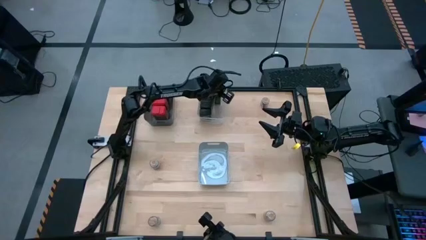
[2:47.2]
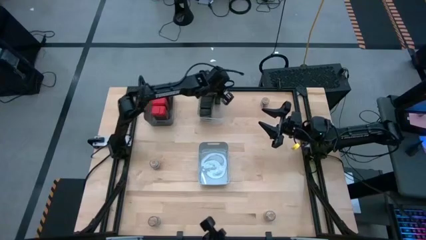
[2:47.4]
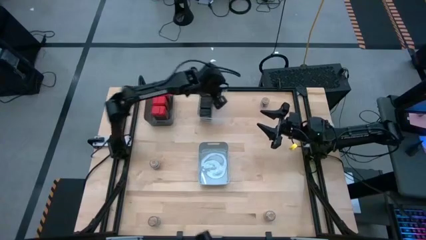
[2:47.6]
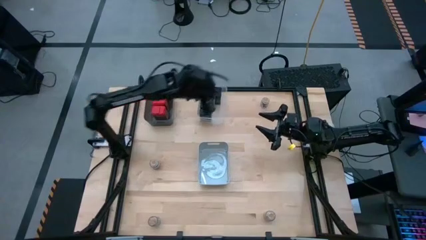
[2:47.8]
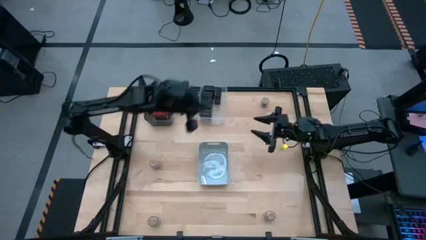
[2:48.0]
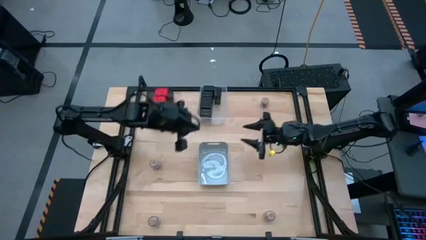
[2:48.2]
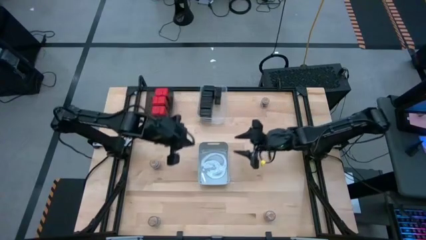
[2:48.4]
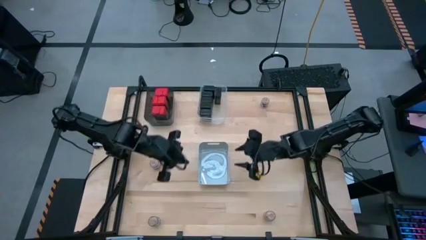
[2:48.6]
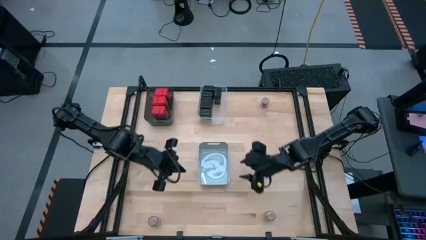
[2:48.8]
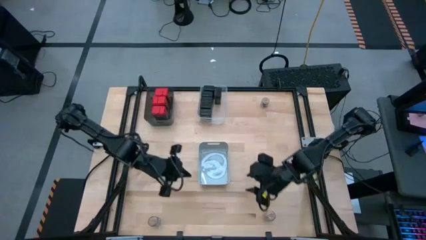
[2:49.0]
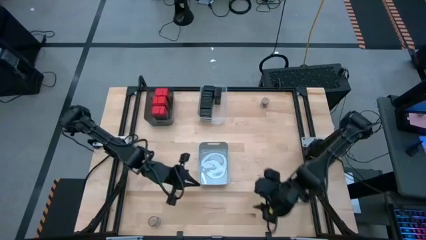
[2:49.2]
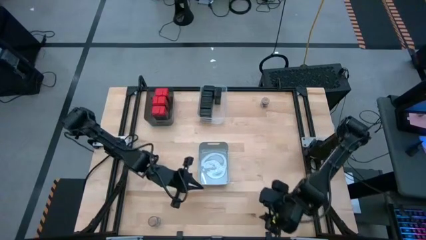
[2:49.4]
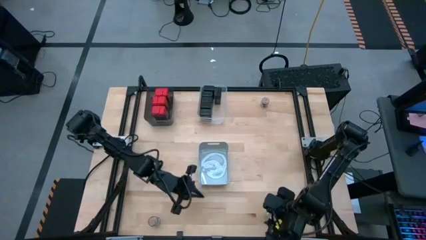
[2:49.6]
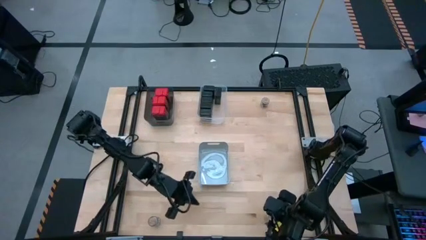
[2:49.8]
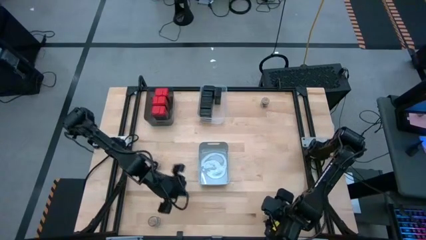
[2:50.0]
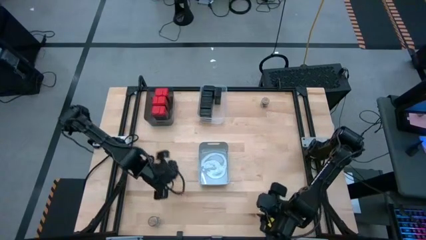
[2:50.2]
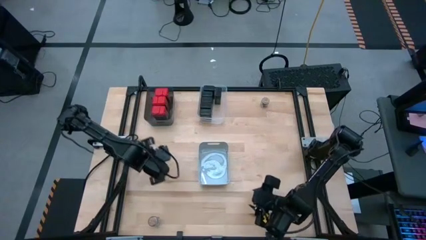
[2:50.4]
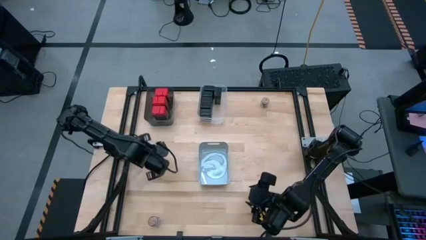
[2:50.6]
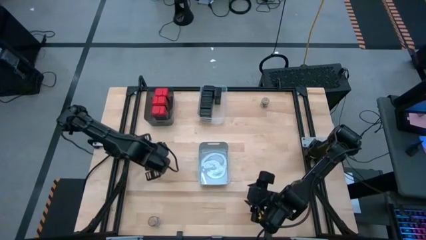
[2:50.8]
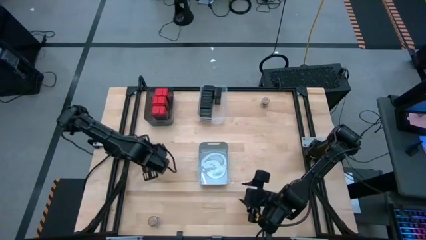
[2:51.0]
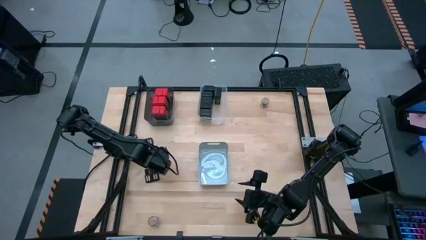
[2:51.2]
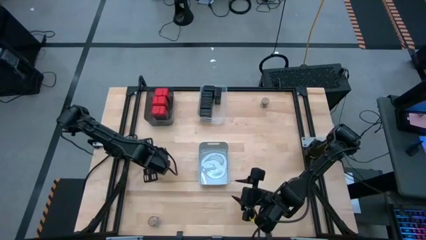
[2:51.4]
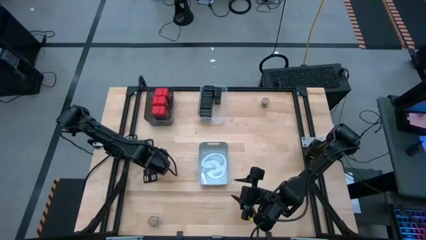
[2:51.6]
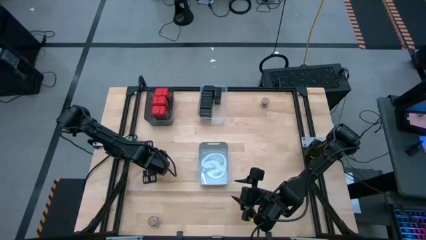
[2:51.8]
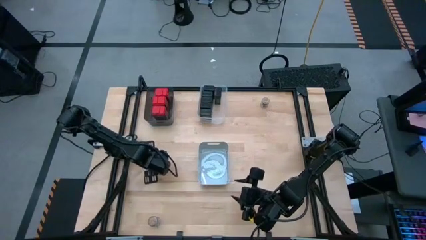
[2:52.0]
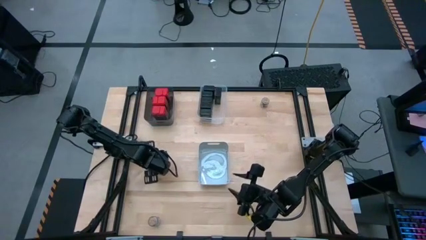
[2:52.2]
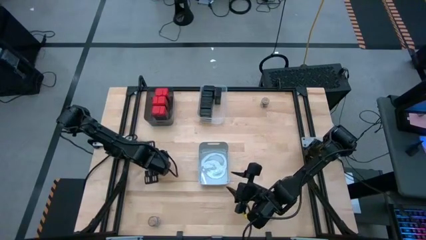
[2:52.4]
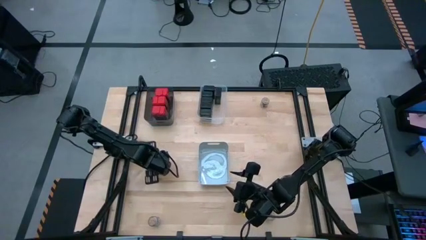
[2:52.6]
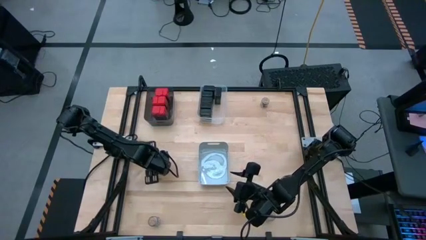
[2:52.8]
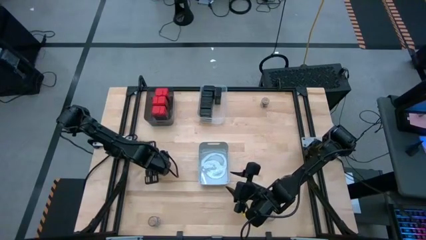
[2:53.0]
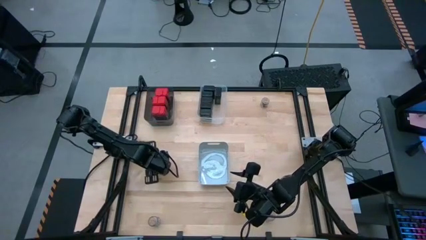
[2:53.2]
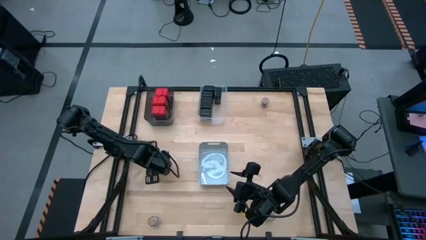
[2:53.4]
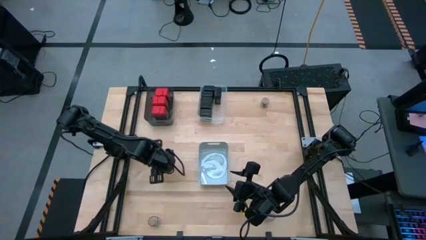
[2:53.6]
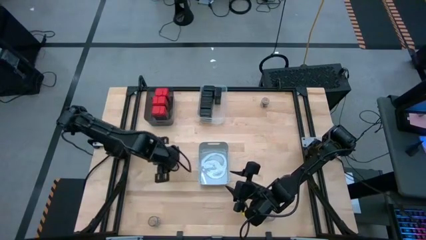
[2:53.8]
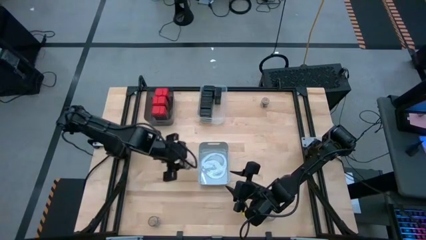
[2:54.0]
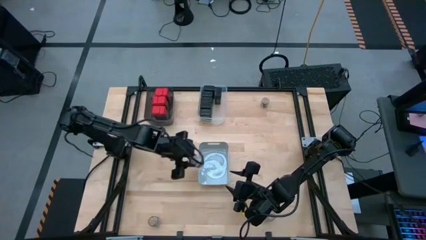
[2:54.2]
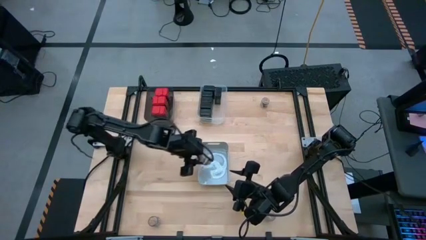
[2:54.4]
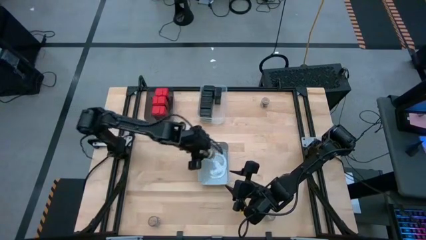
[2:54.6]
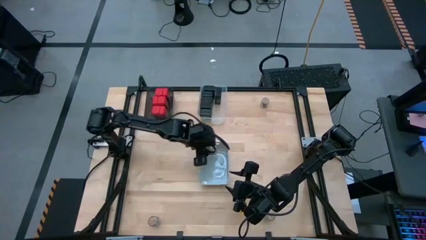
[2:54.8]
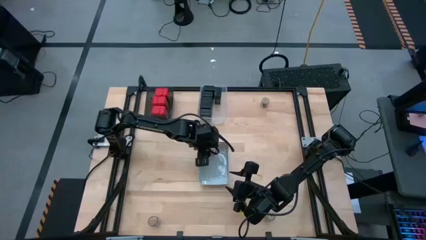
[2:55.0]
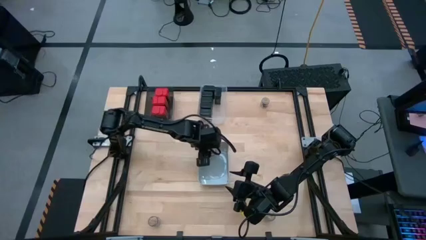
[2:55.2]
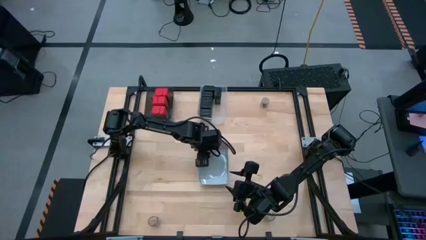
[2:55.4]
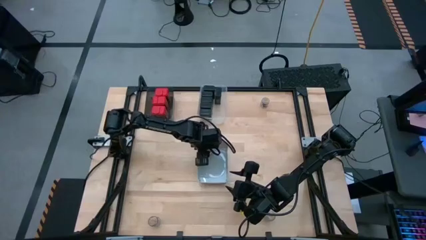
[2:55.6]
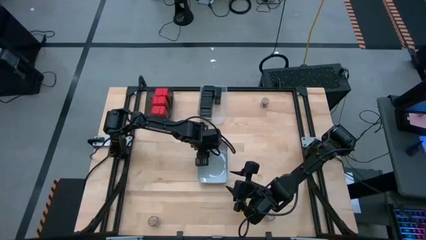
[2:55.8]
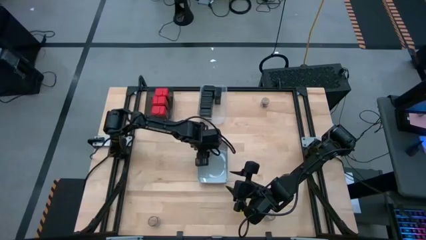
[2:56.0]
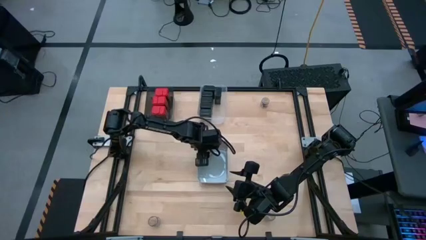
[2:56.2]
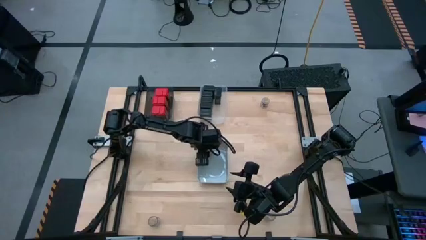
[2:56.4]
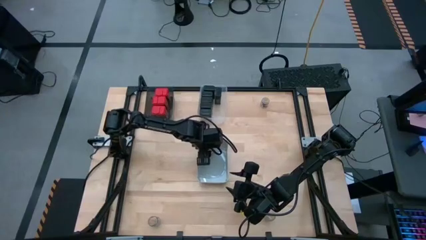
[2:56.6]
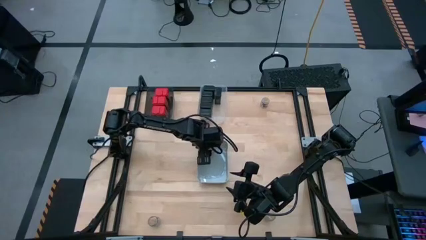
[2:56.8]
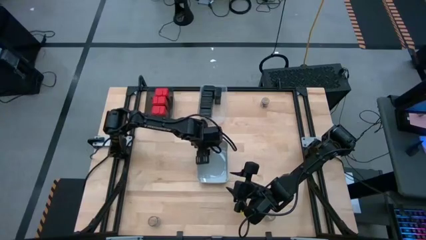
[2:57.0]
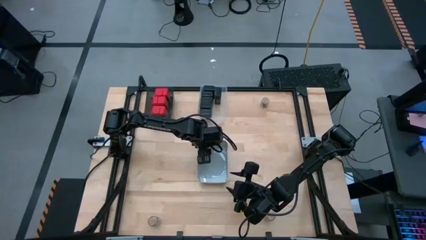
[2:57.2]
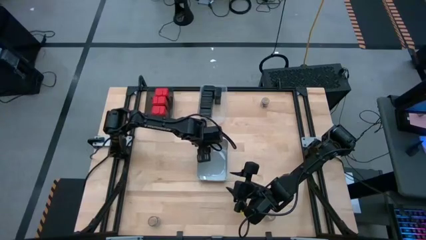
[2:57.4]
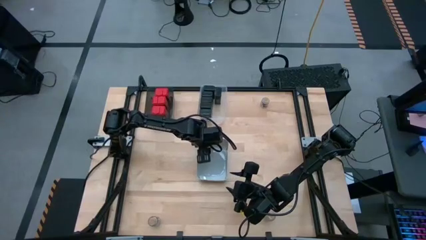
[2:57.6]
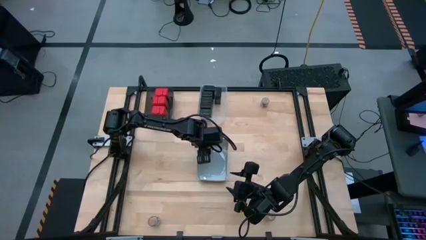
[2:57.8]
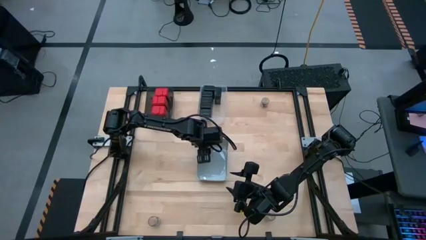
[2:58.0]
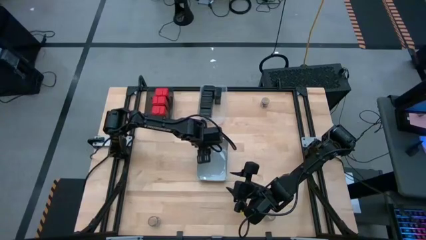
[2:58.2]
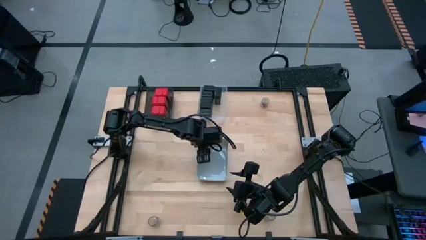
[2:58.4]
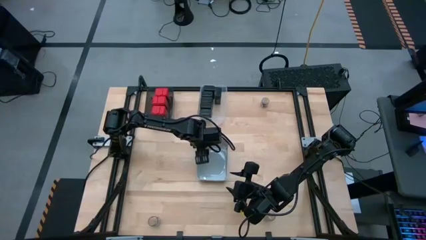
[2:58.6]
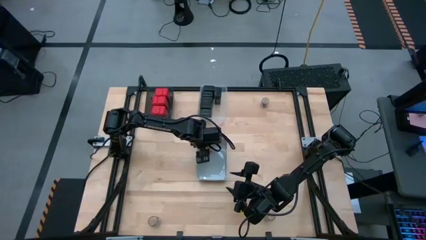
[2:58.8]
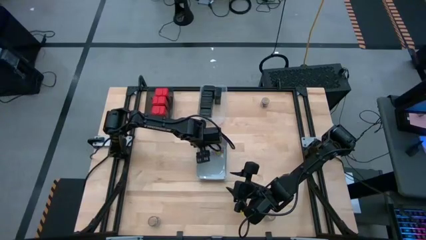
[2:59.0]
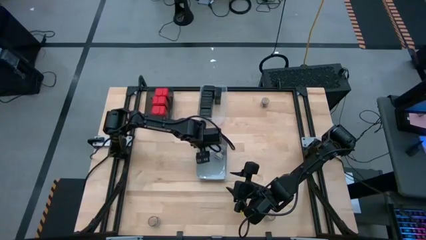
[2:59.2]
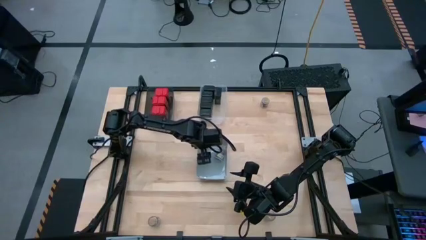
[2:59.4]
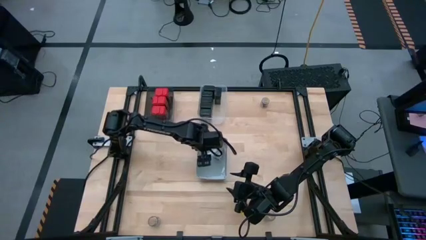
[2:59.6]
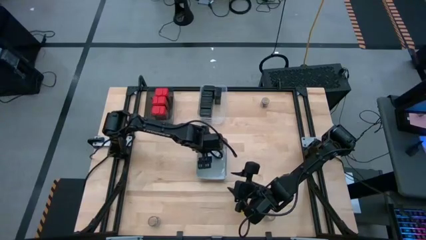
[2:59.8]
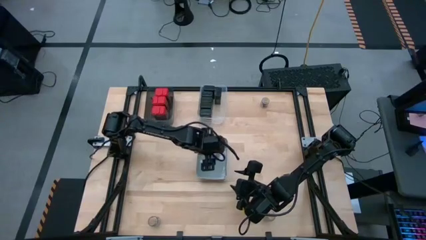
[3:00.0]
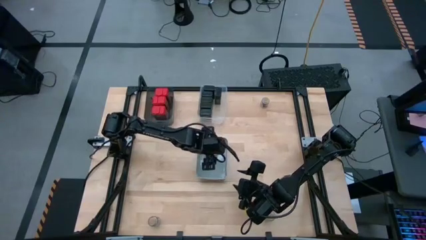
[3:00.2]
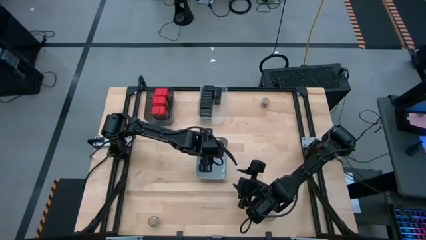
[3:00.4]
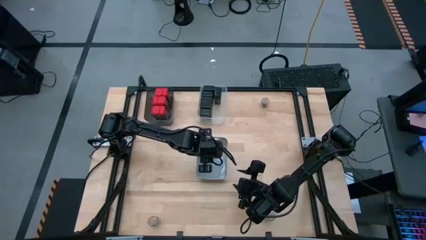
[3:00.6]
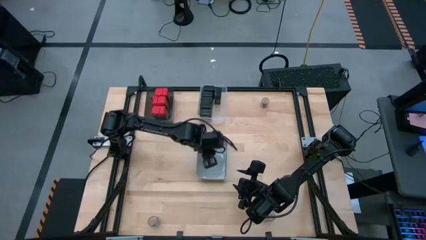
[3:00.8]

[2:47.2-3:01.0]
Task: Sort spices by type
Put the brown seasoning bottle into the gray bin

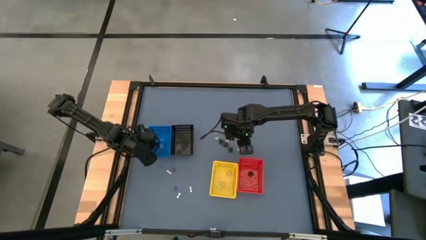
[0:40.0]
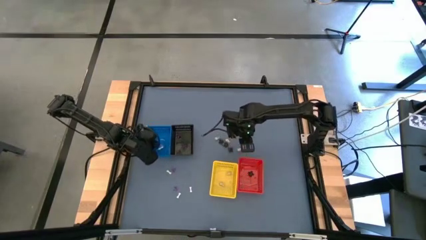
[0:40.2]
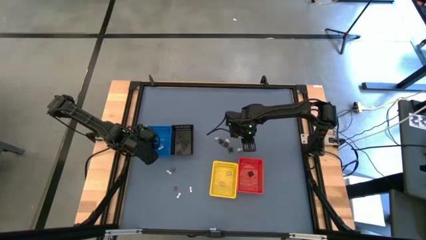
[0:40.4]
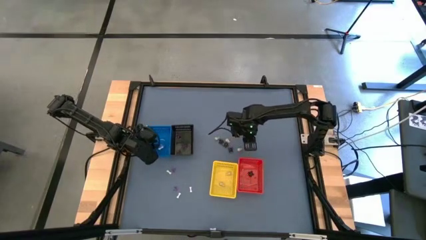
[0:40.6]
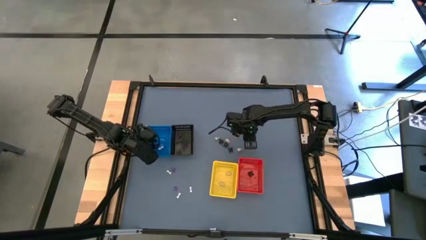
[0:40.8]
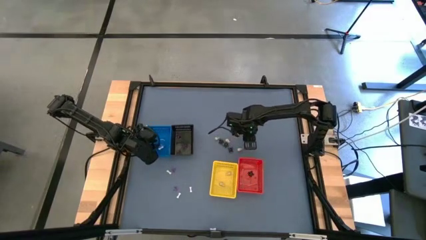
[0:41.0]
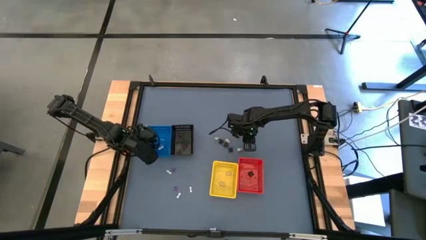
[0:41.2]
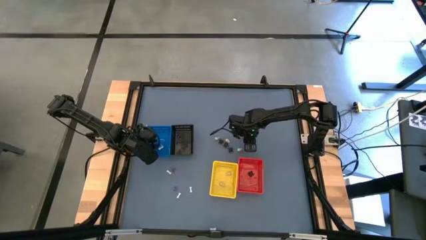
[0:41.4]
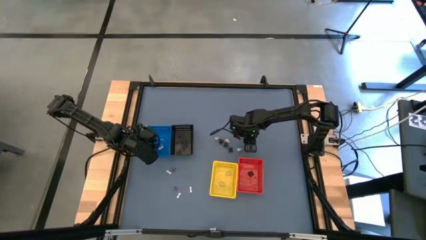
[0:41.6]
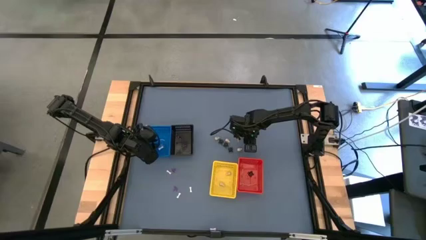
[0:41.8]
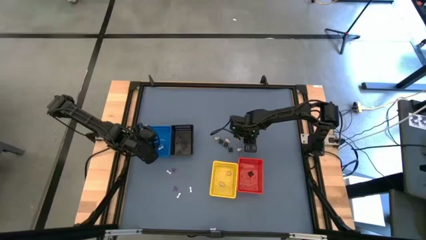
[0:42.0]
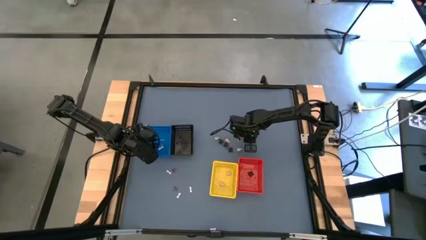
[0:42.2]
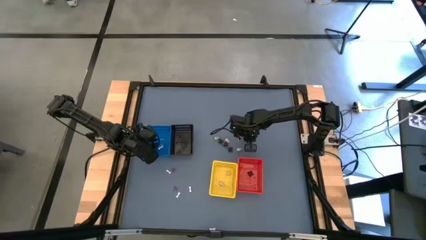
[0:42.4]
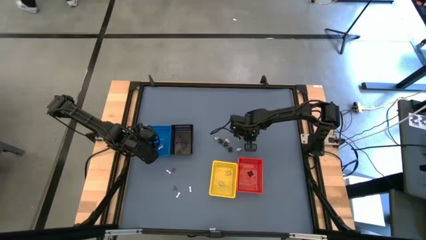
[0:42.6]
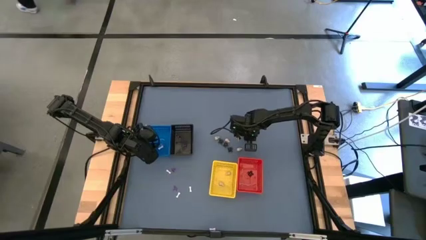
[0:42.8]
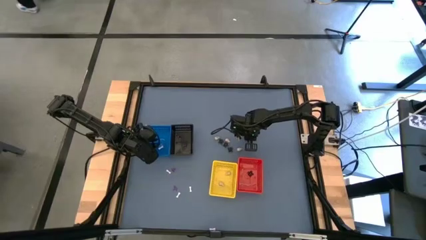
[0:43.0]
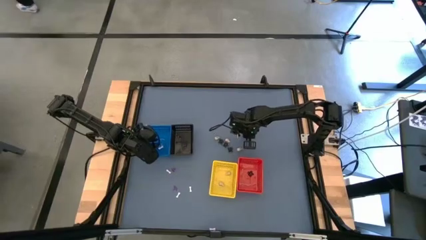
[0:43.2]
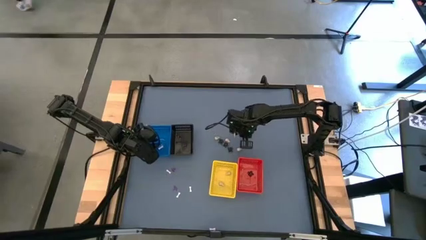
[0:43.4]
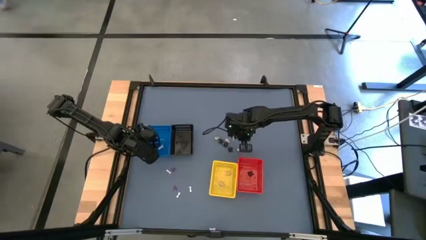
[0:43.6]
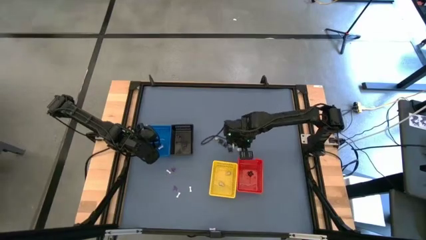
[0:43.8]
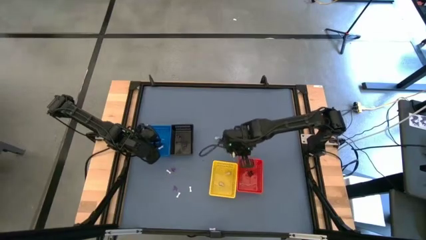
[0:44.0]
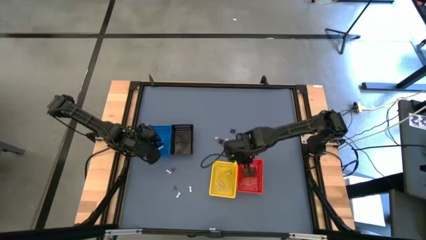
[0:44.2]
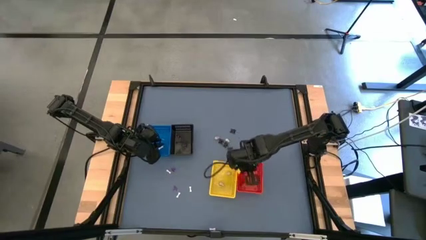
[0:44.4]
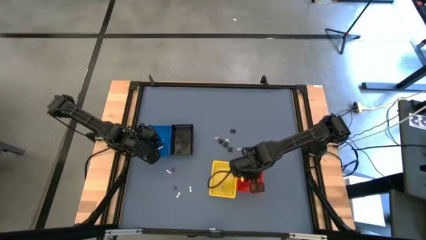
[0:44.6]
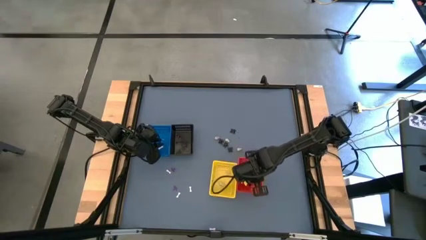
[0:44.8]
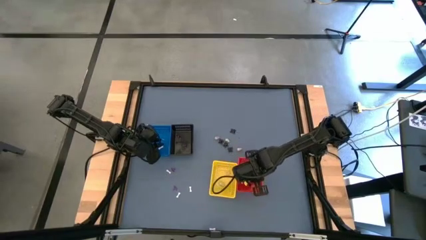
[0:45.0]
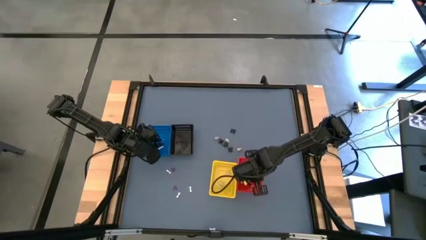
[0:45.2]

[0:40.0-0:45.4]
Task: Sort Halloween decoration
Put the spider toy into the red bin
